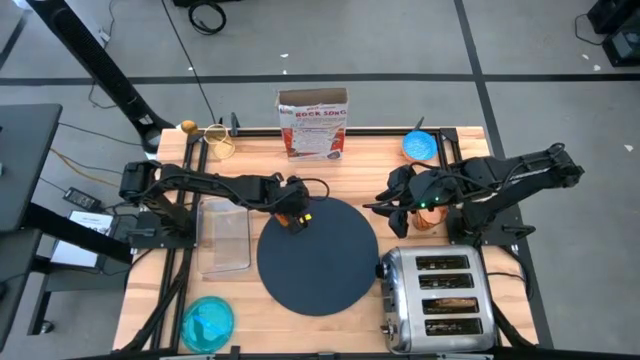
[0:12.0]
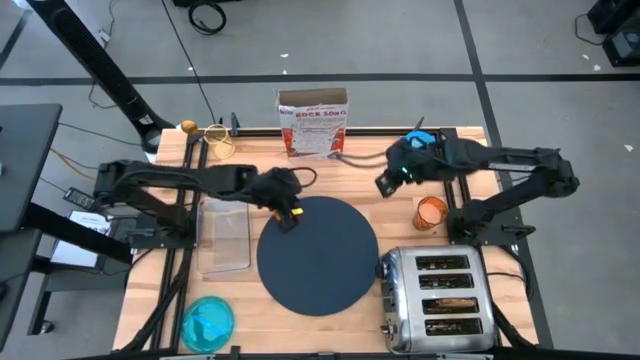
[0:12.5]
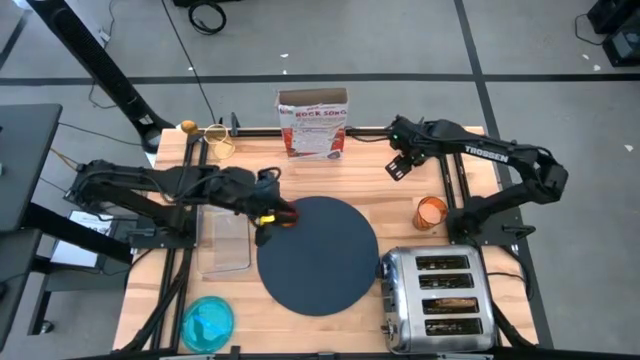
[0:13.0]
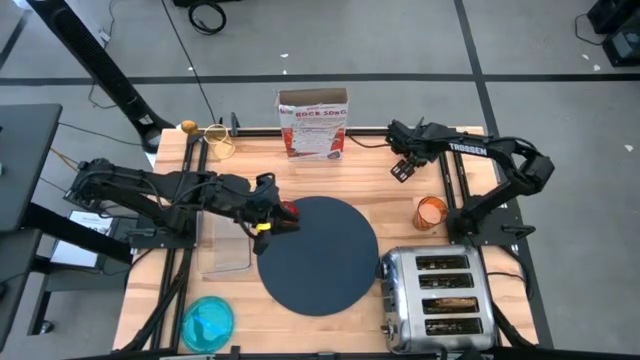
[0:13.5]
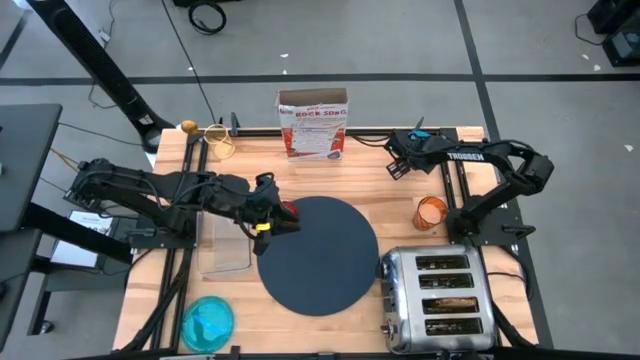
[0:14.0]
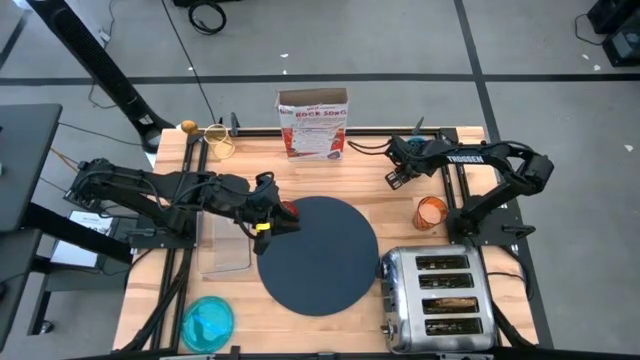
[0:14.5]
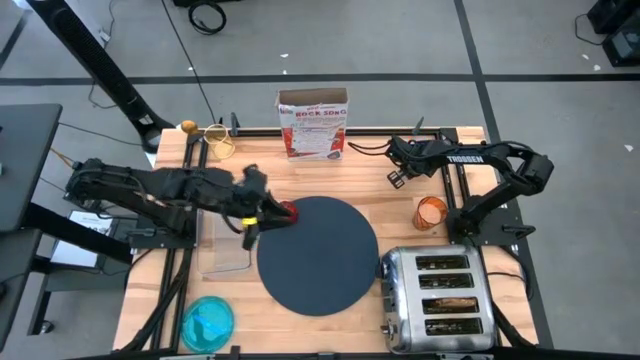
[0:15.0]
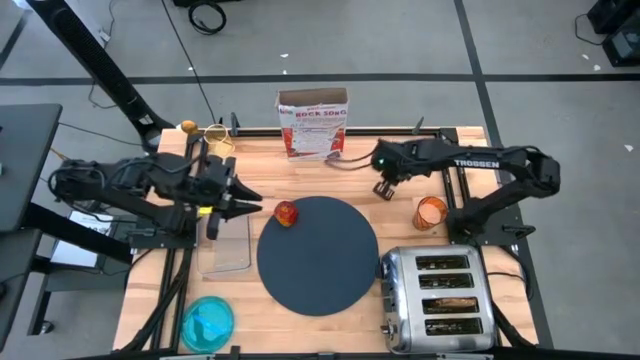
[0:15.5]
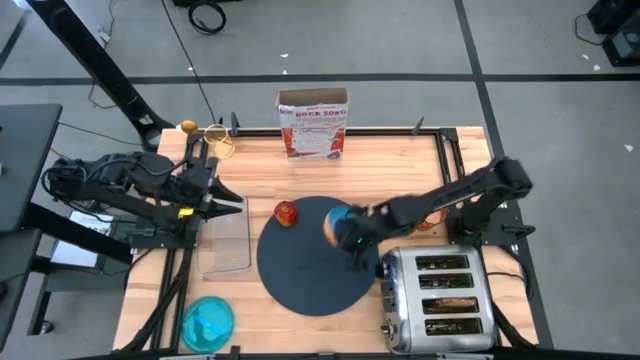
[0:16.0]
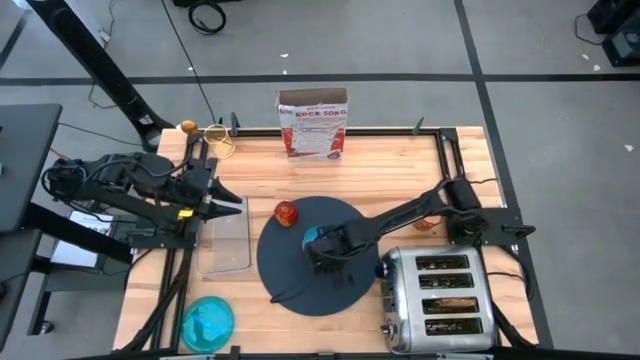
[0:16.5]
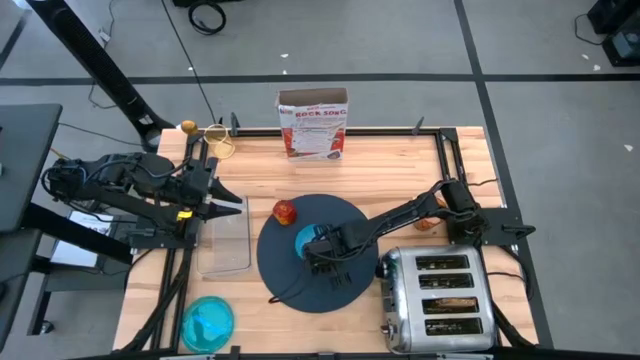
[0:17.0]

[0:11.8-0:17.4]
Task: Arrange a breakfast setting
Put the blue bowl on top of the dark blue placemat

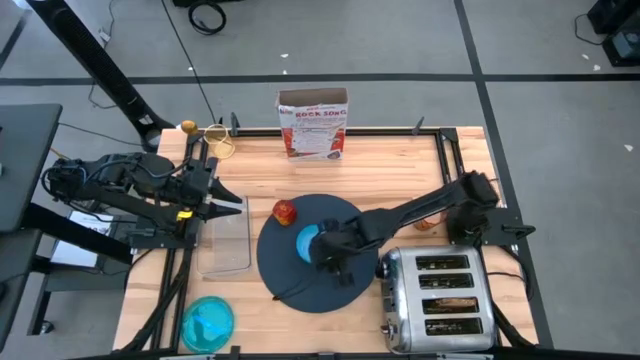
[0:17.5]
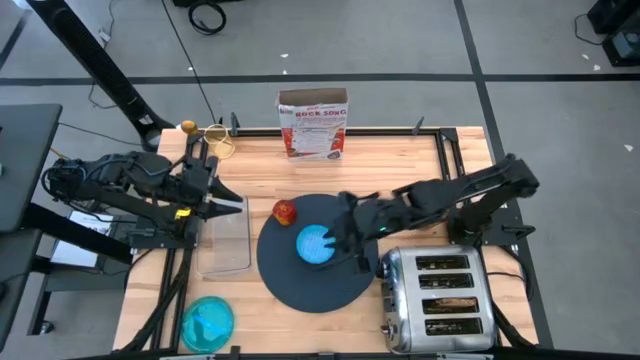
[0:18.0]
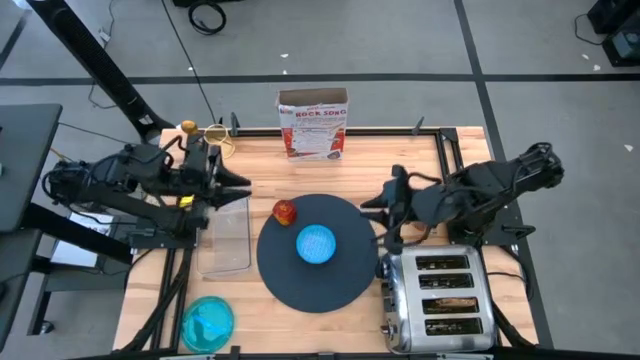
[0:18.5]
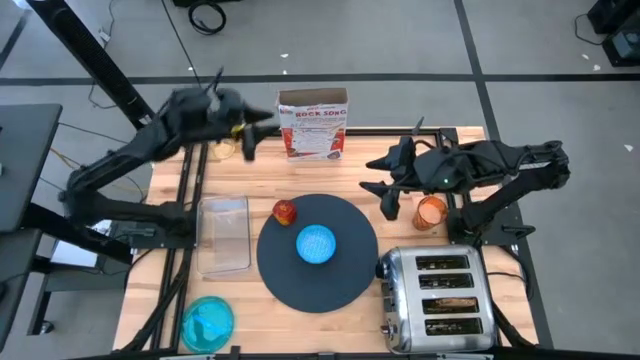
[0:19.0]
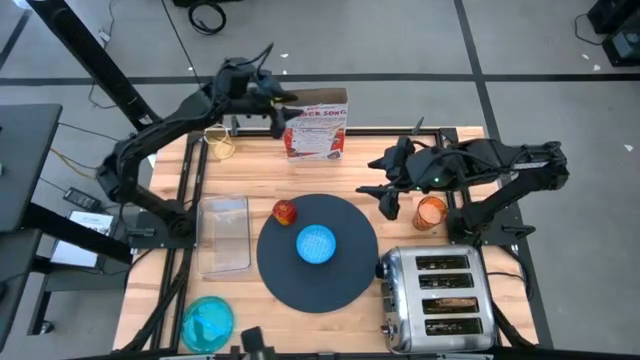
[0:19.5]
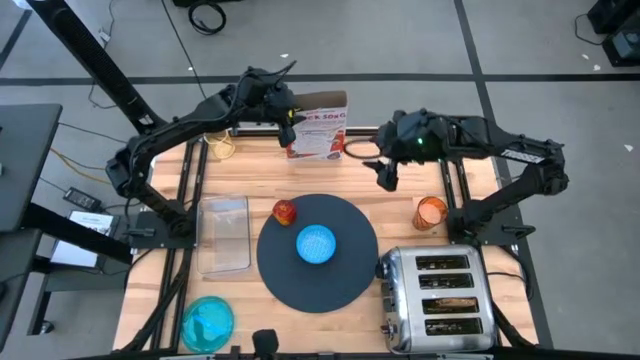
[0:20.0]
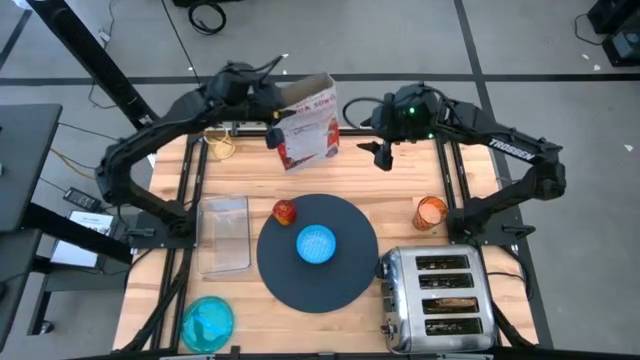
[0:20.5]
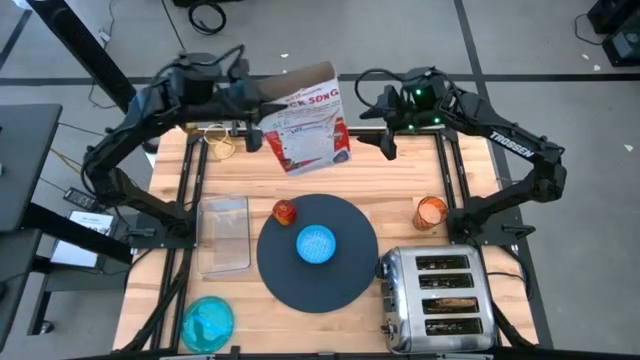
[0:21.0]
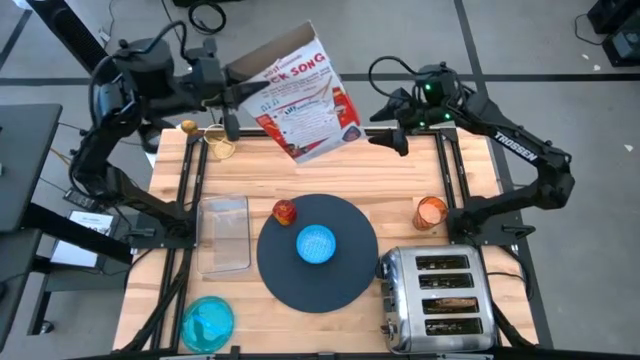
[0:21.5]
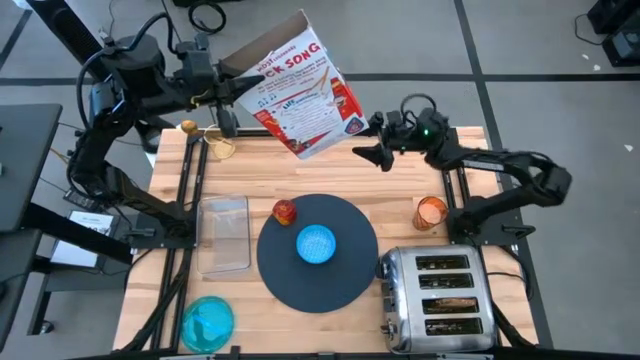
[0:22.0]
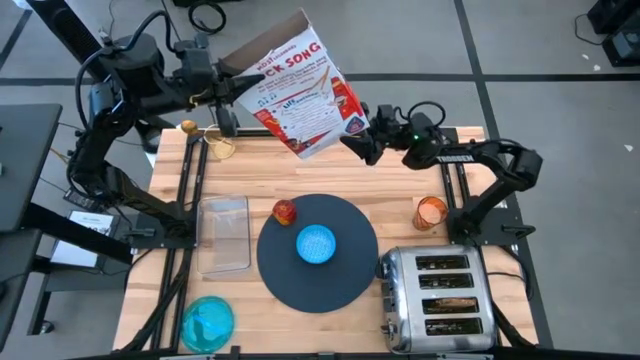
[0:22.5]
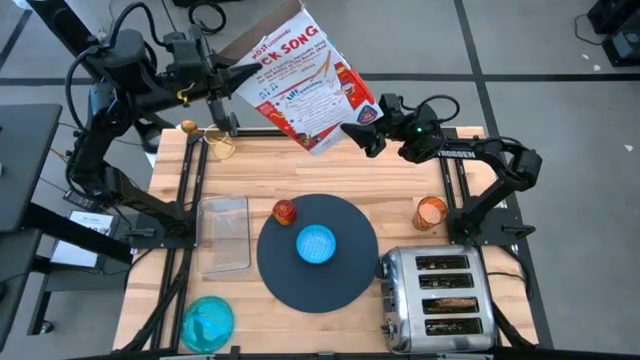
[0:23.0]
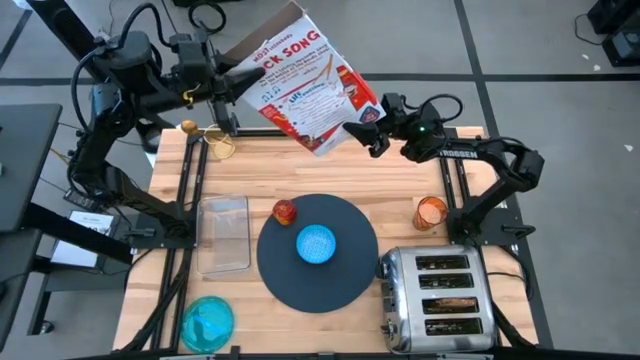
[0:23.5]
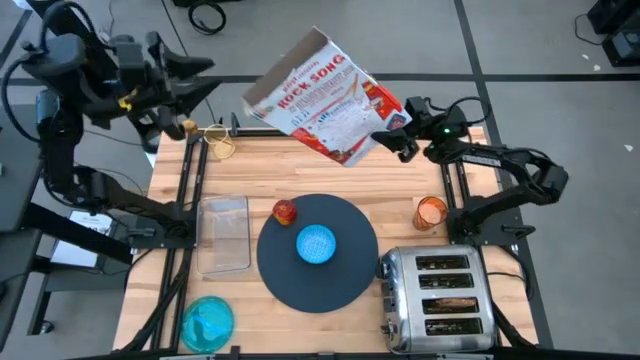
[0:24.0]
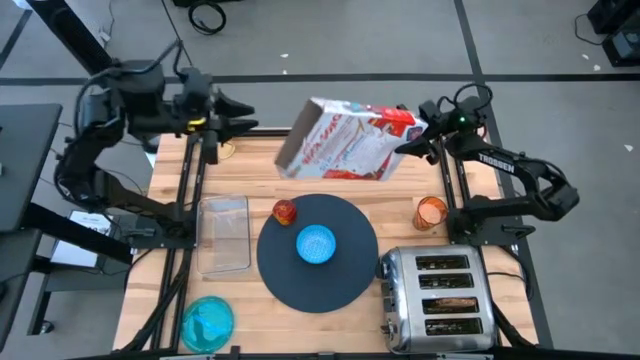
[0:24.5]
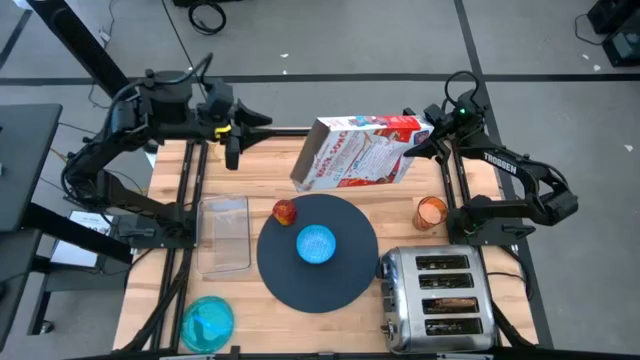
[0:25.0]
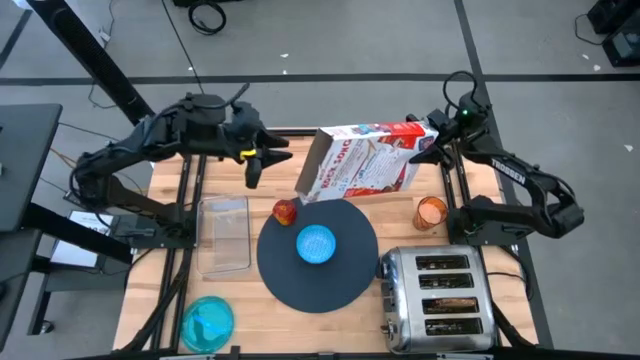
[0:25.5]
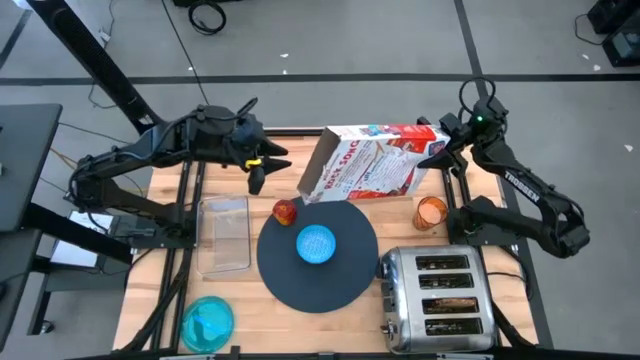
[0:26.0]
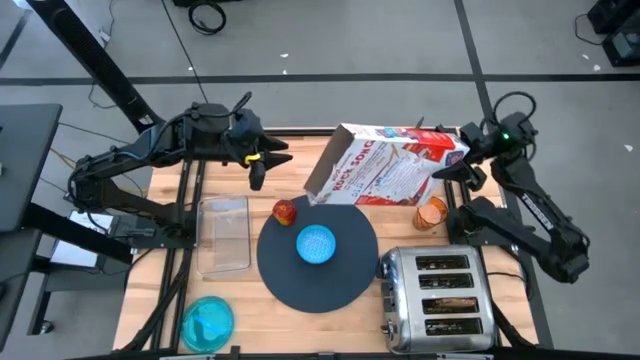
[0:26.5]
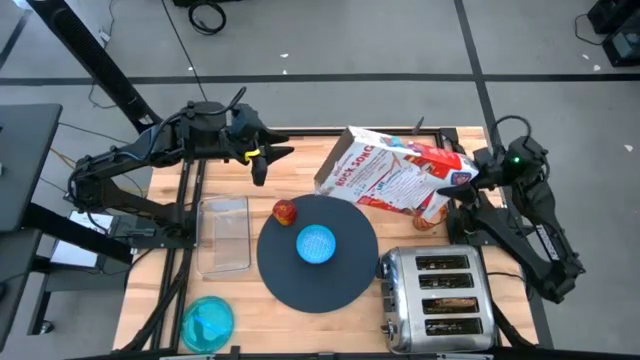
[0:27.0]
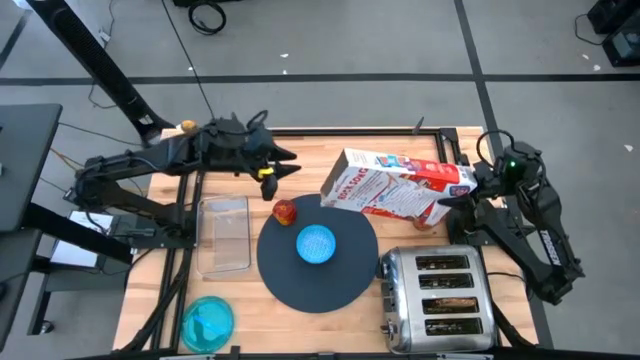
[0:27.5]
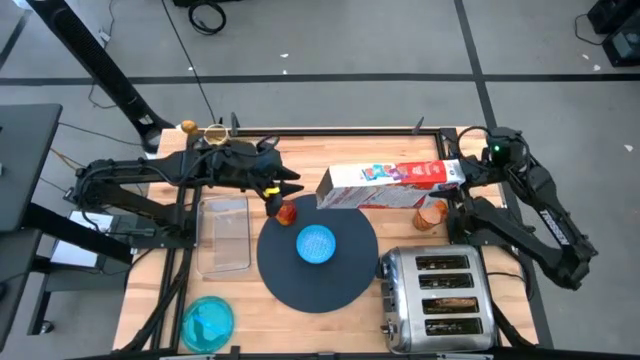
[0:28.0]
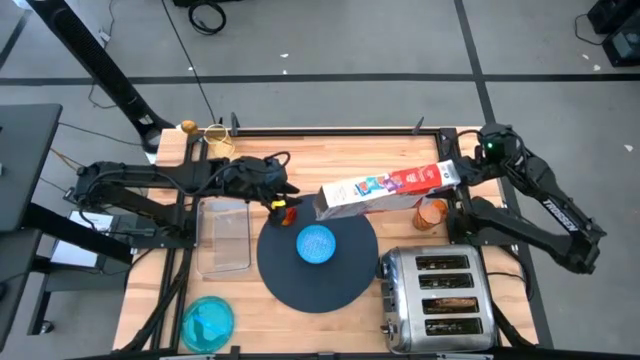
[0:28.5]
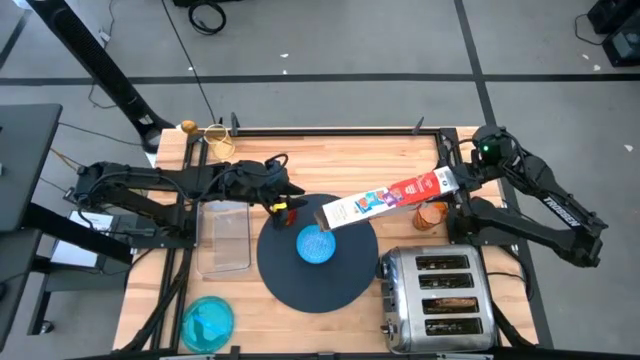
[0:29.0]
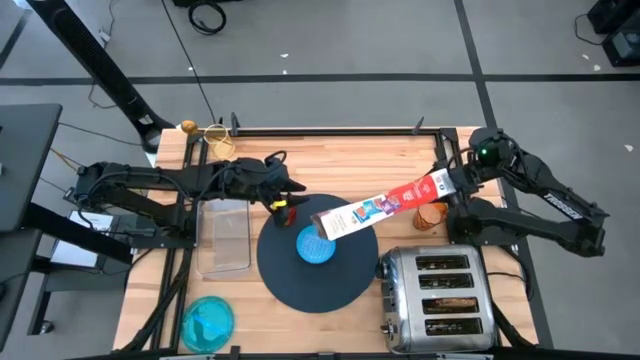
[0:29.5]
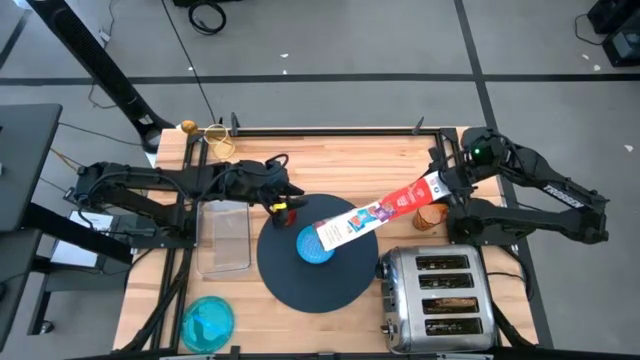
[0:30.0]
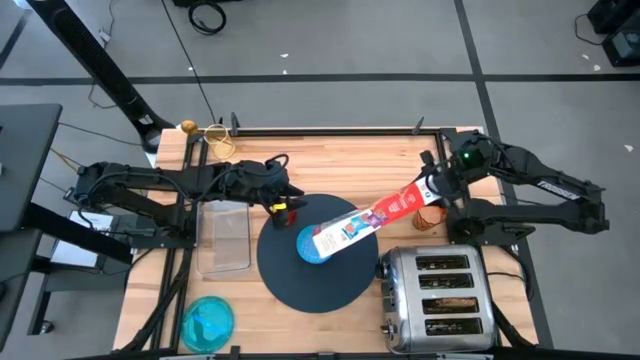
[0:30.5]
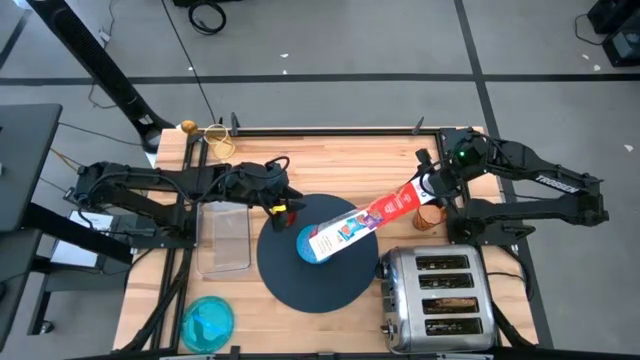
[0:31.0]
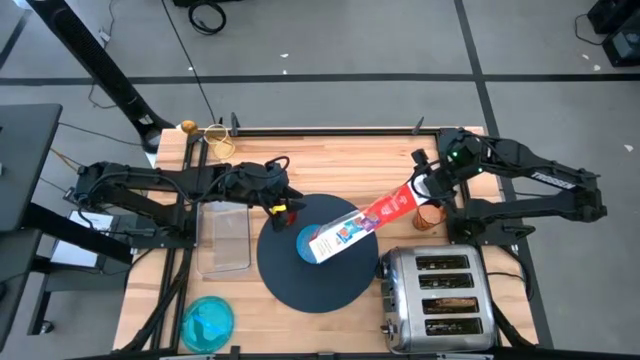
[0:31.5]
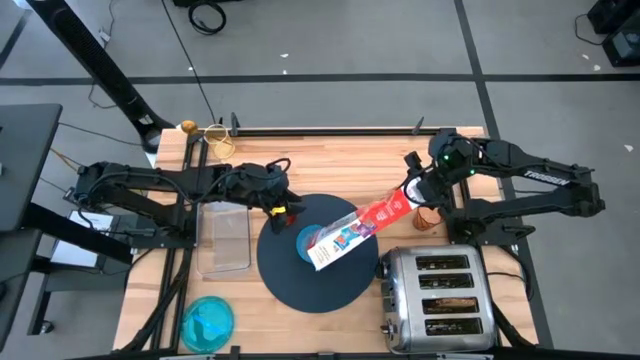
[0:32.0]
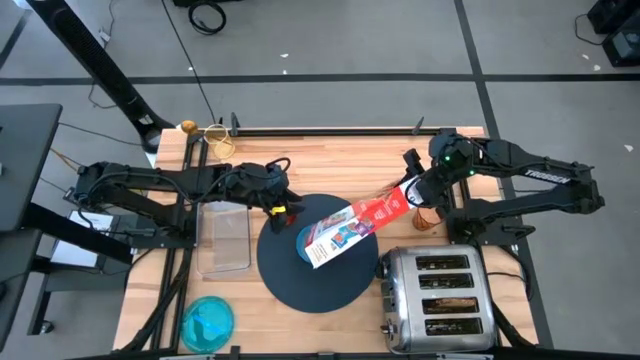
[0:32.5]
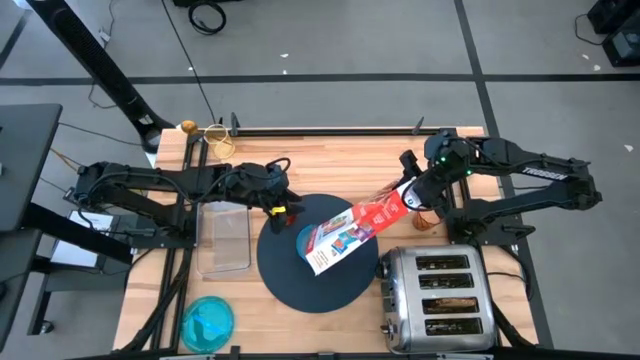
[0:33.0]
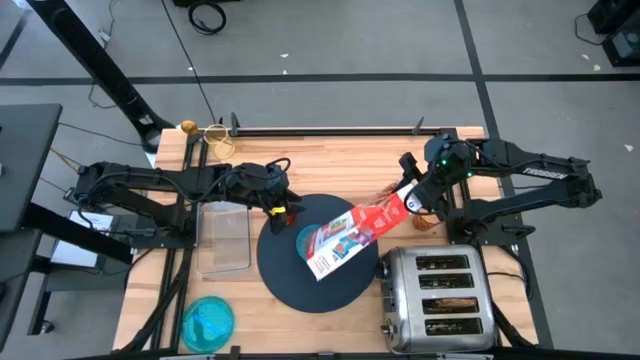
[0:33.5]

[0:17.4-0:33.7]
Pour the cereal into the bowl
